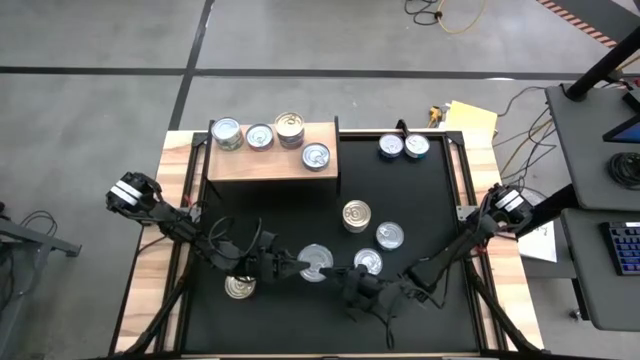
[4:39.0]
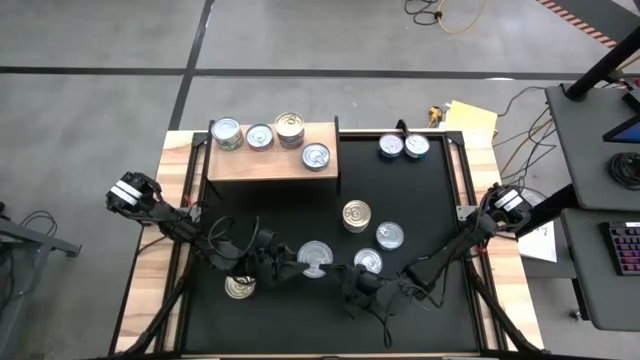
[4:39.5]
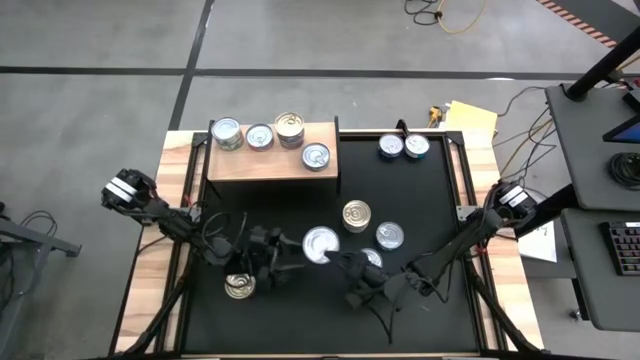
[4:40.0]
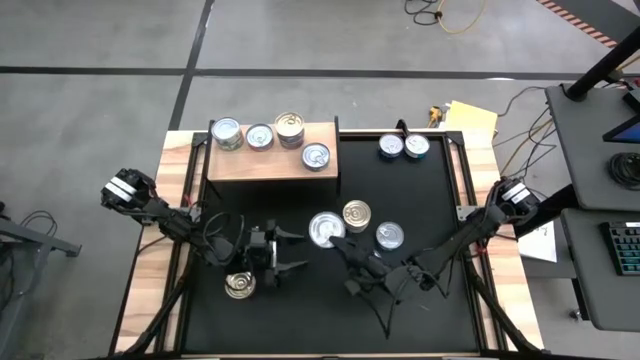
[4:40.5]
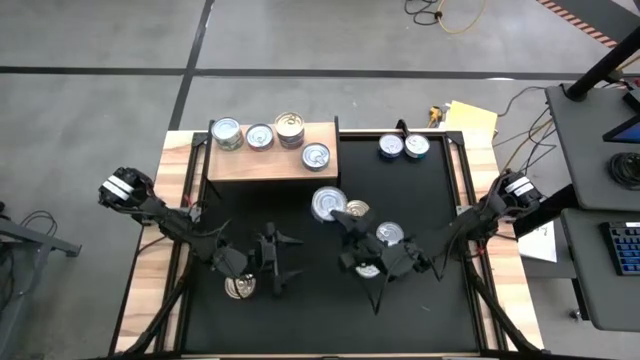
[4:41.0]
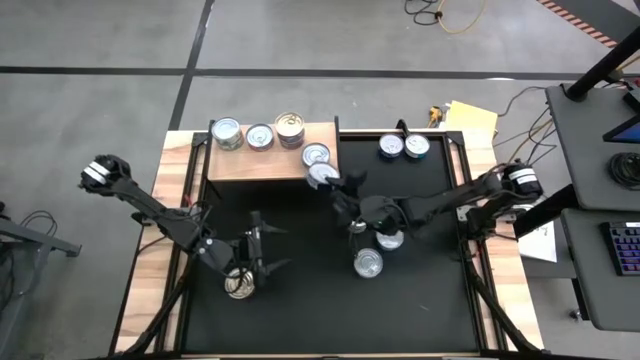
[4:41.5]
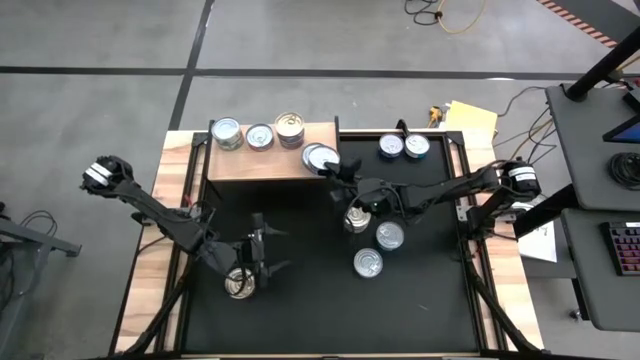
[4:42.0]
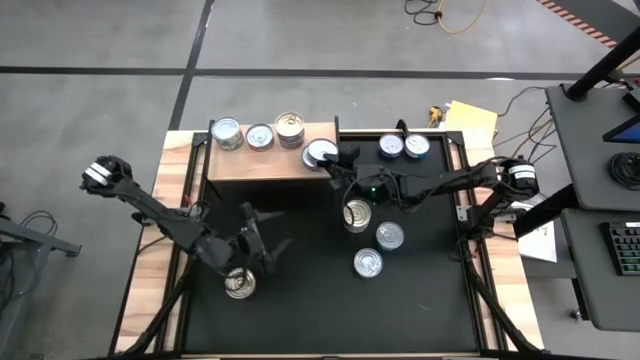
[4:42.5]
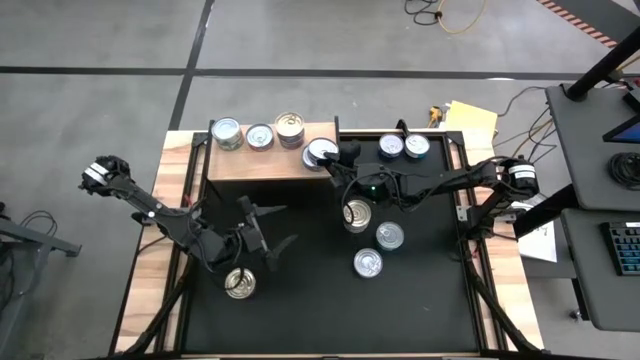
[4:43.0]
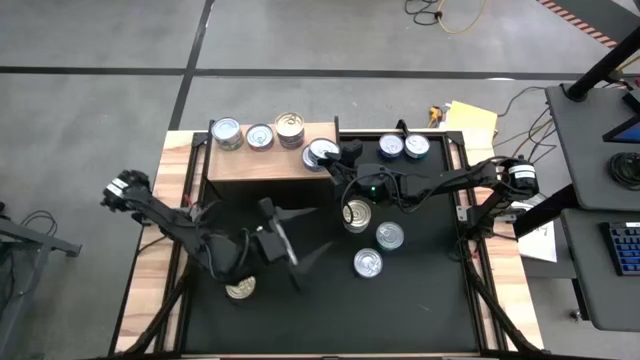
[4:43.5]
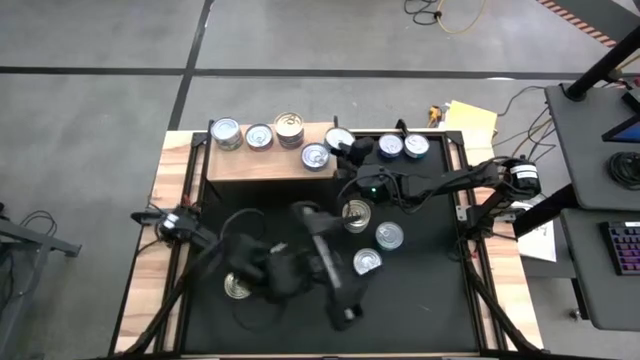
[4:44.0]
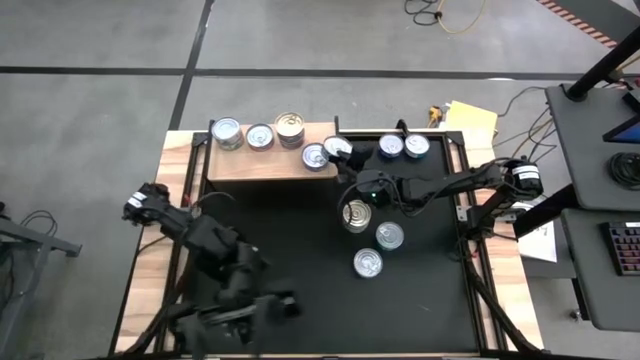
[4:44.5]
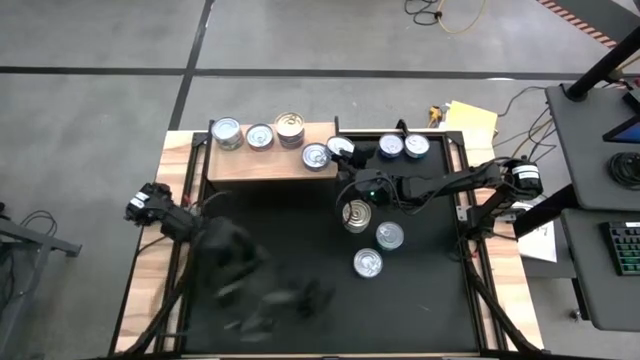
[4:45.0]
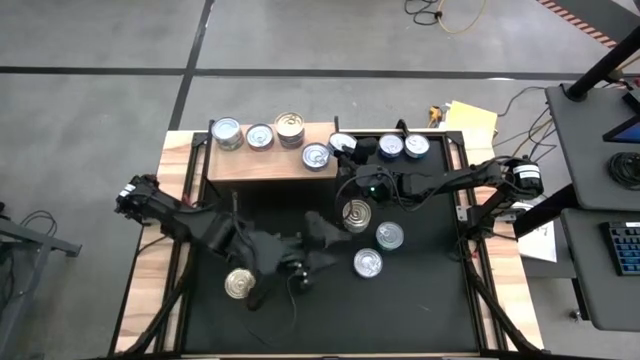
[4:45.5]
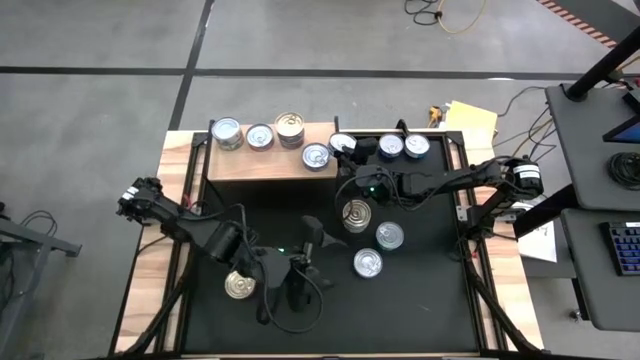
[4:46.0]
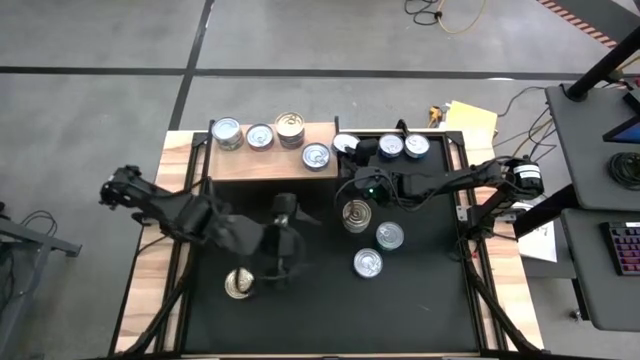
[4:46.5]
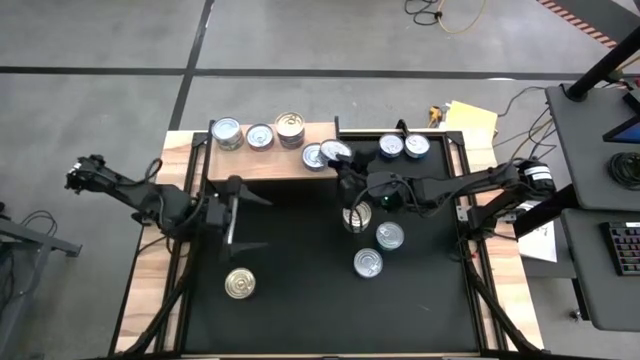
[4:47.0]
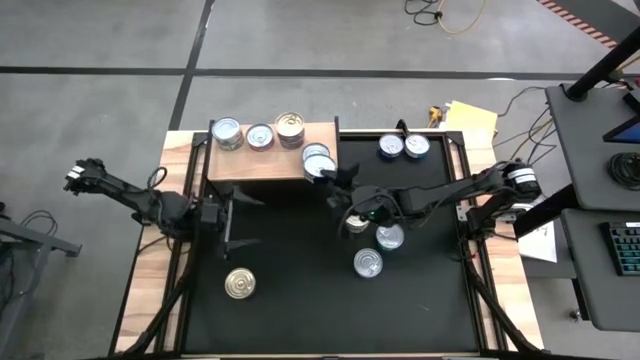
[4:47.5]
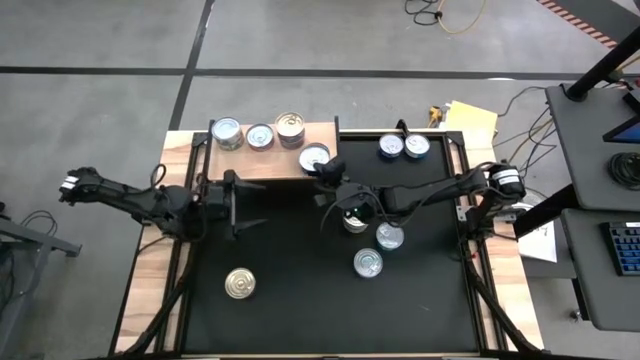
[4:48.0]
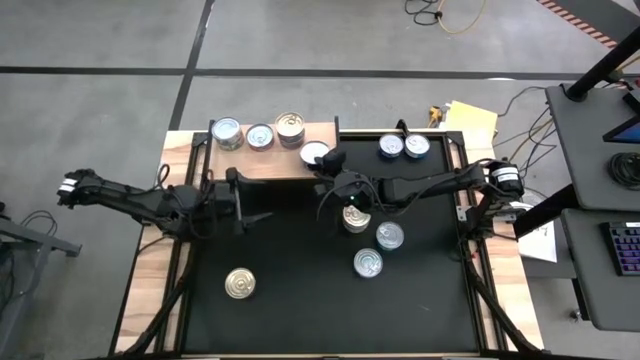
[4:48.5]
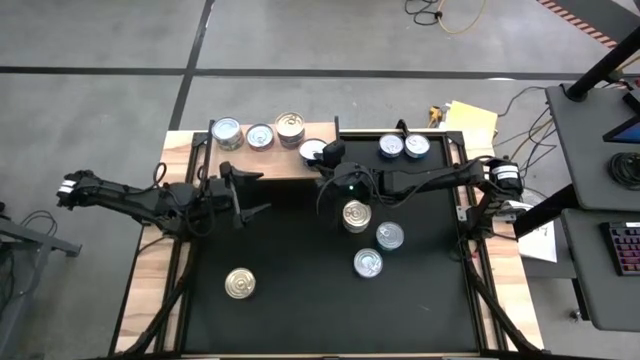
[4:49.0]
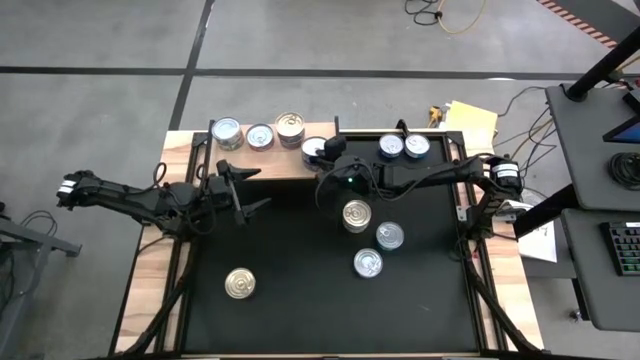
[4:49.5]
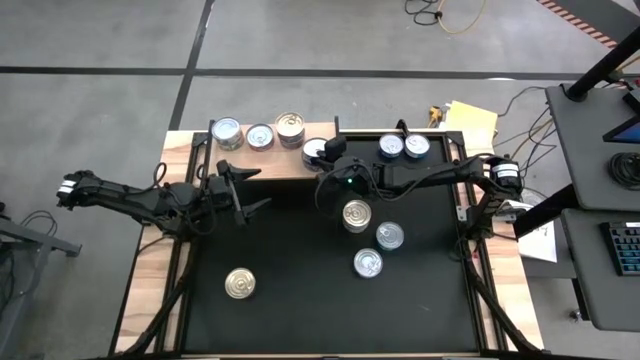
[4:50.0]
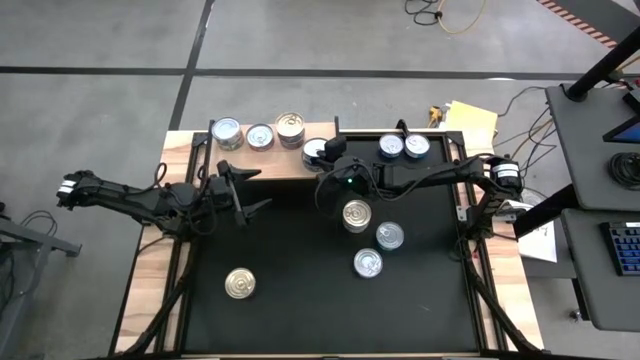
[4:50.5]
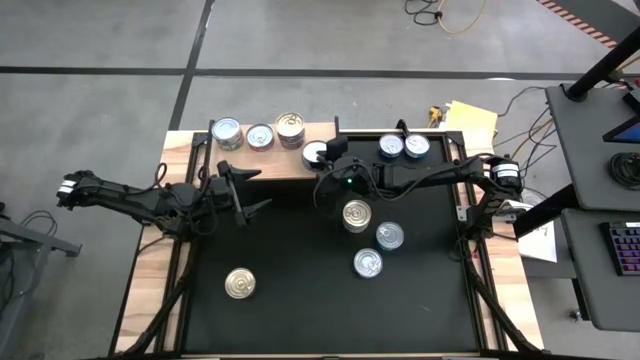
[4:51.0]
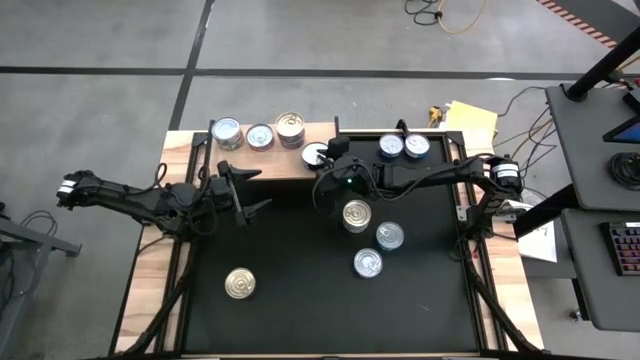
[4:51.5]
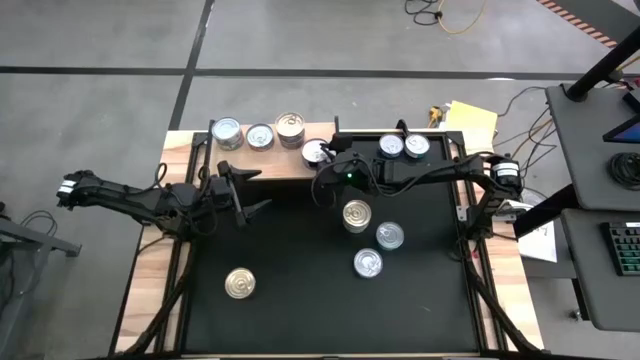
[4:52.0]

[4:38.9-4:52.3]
Task: Stack canned seafood by type on shelf
Stack the blue tuna can on top of the blue tuna can on the shelf

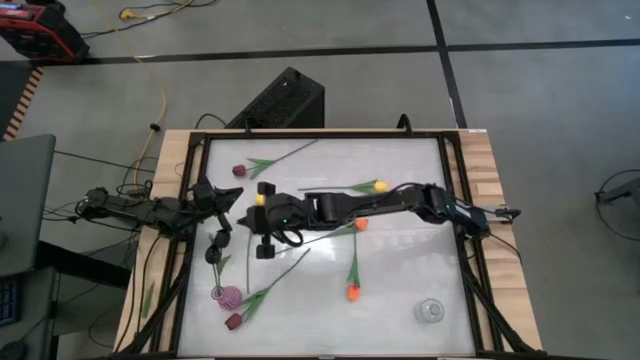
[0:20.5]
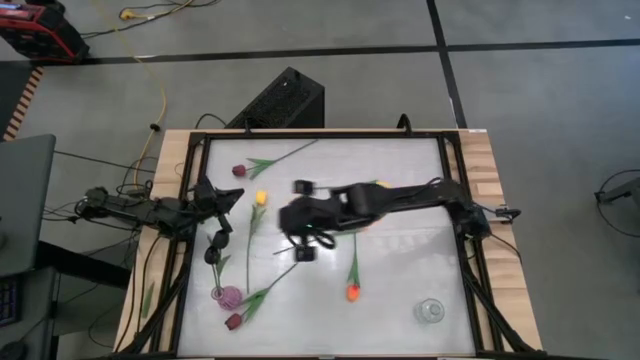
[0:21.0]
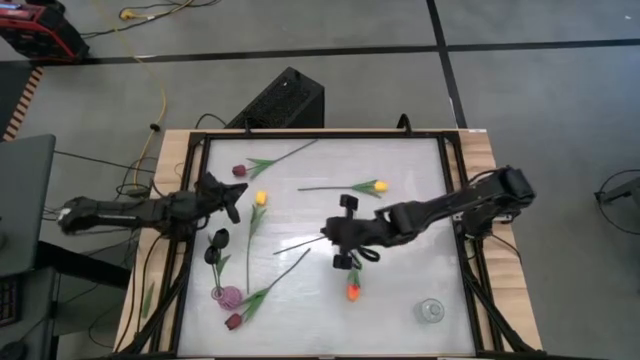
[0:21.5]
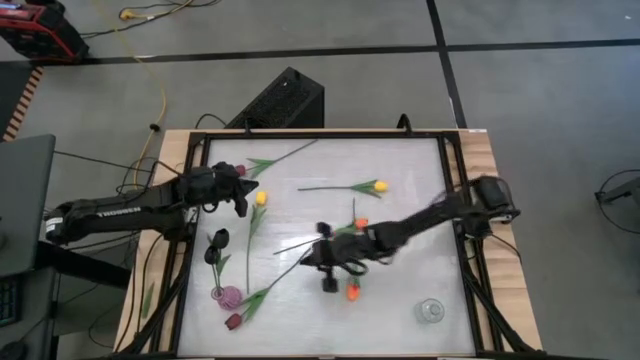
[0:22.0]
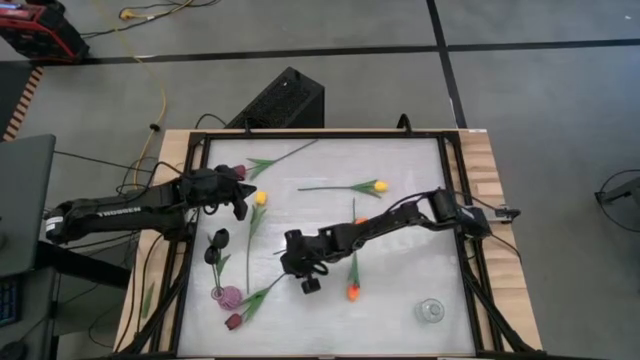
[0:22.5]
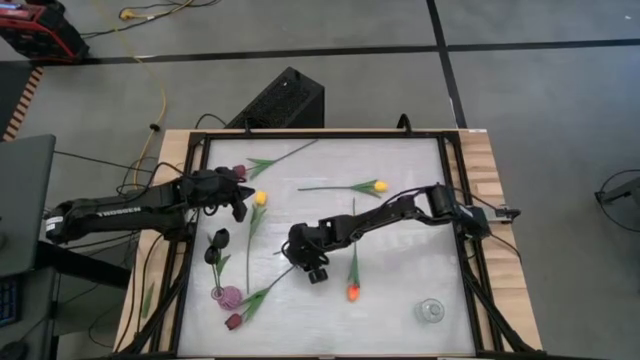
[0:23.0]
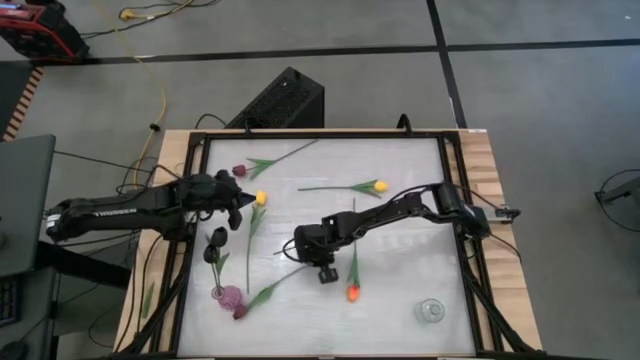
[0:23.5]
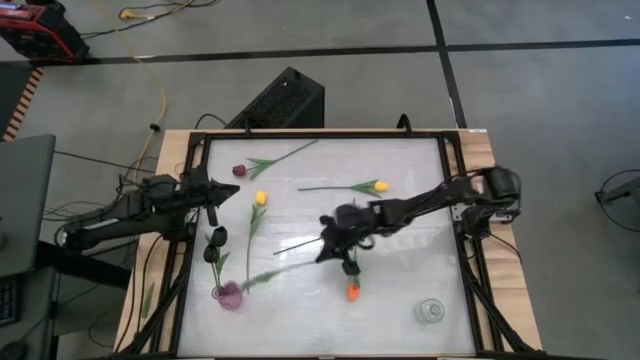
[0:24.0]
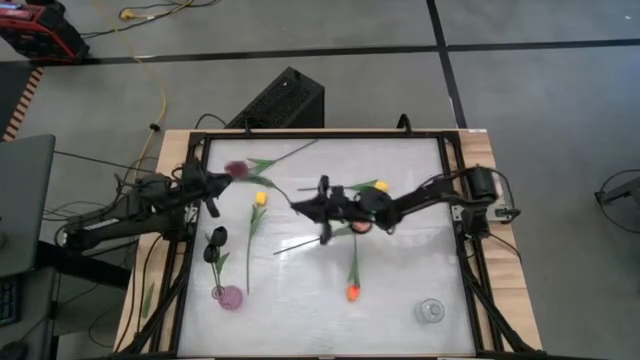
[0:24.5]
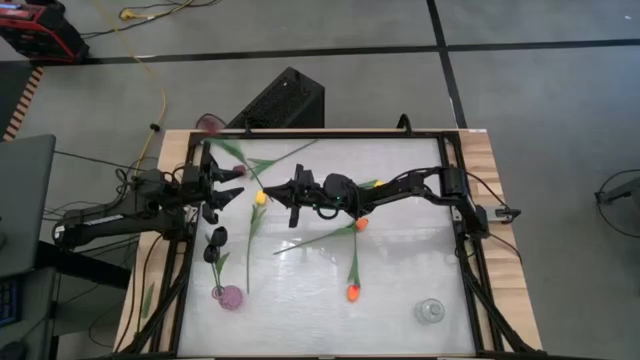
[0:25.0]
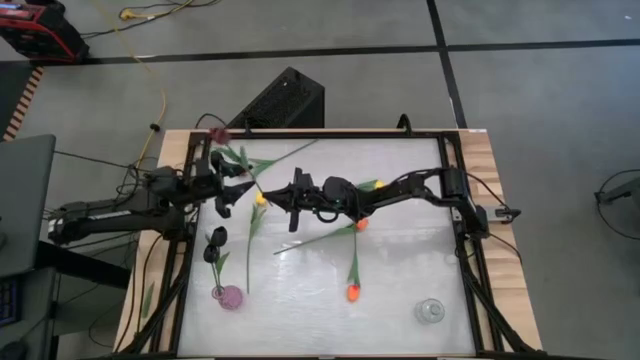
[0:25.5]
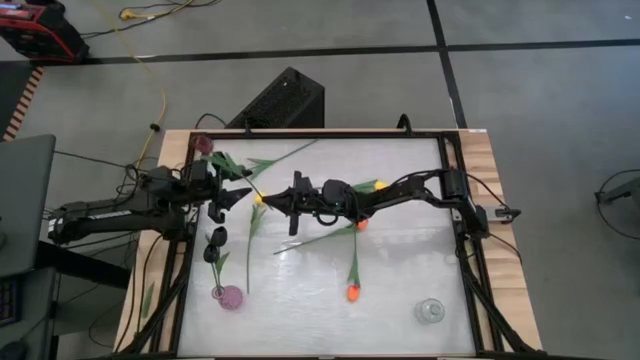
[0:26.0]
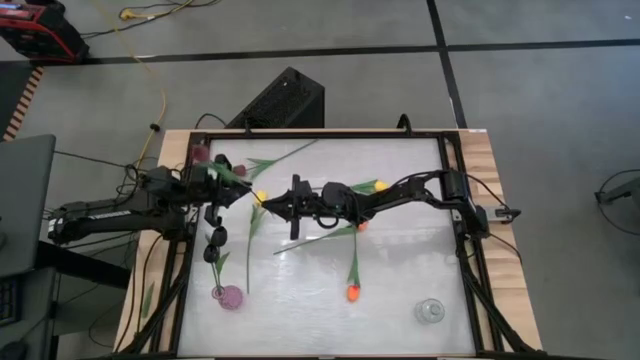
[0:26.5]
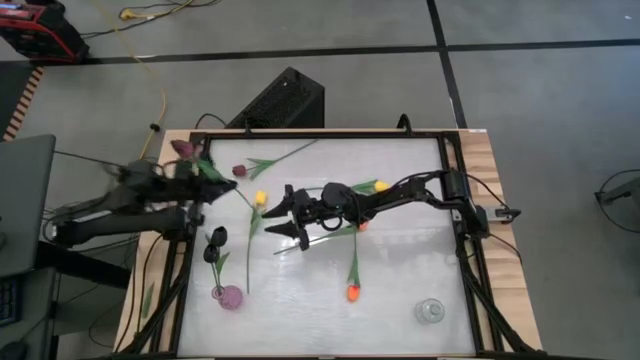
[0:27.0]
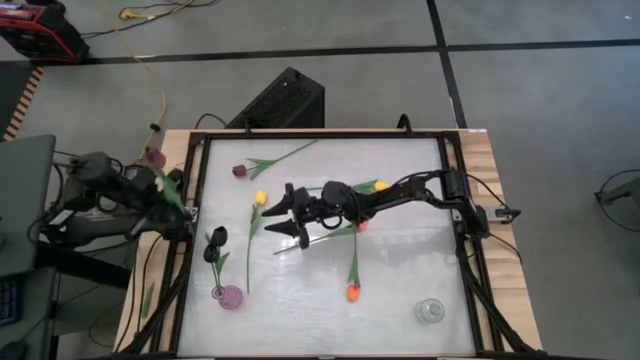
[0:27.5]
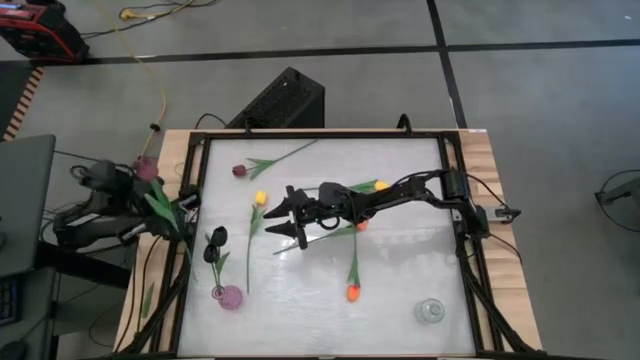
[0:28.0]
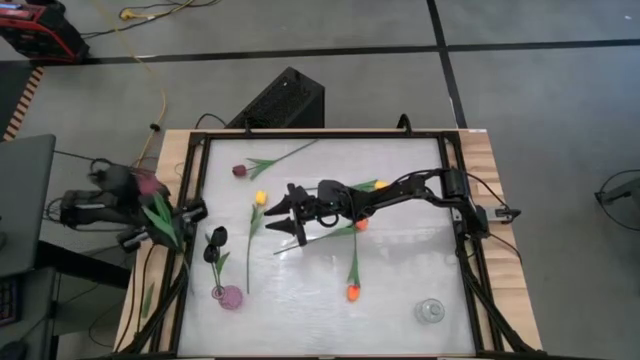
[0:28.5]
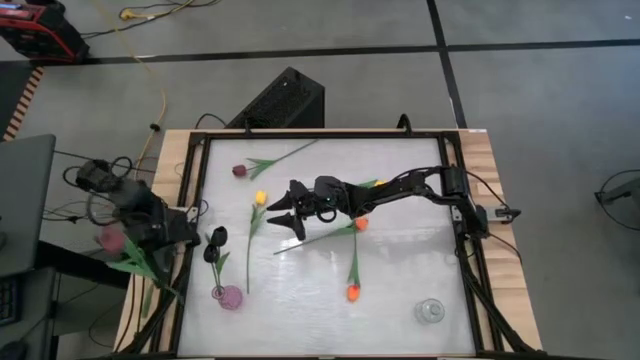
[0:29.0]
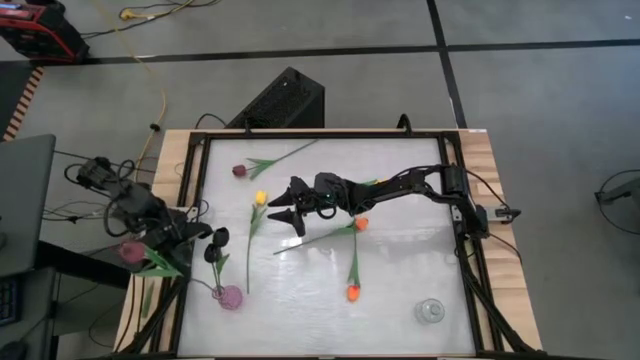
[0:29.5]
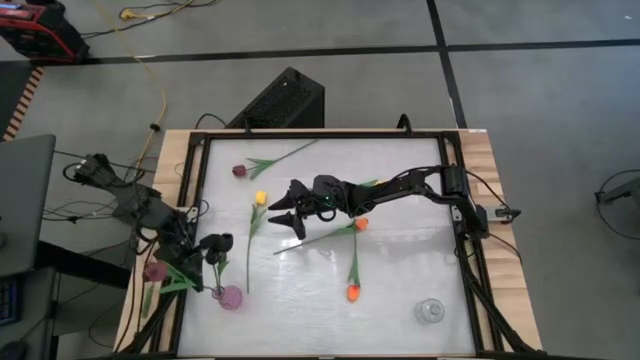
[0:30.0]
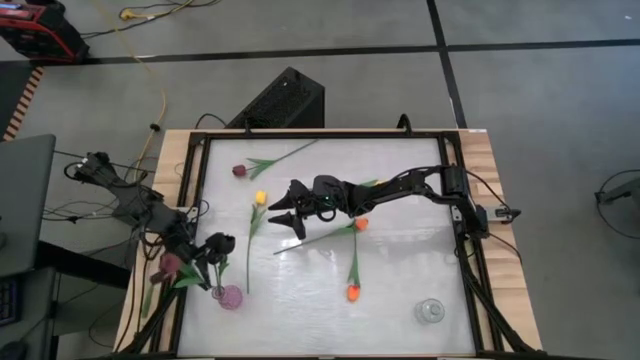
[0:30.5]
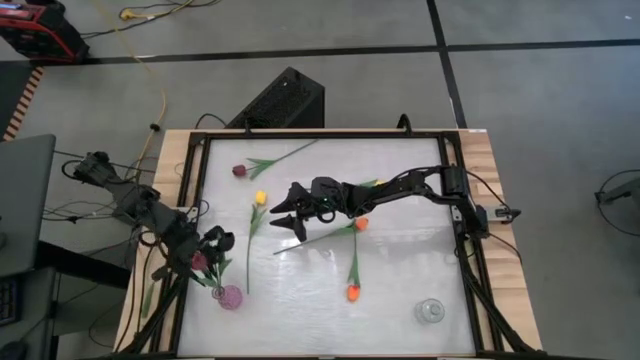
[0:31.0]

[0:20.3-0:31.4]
Task: Sort flowers into vase by color
Put the bottom red flower into the pink flower vase
